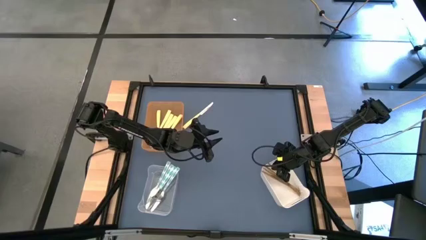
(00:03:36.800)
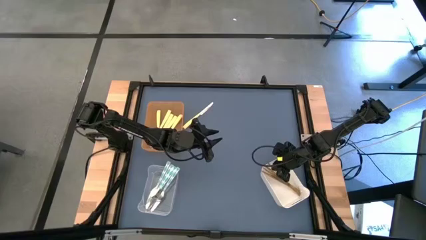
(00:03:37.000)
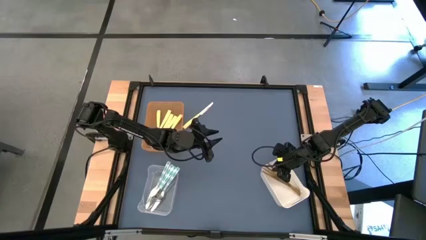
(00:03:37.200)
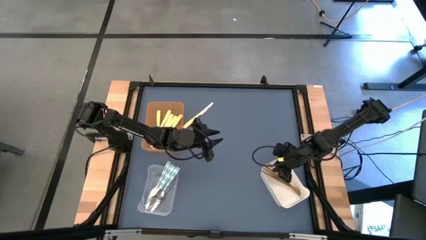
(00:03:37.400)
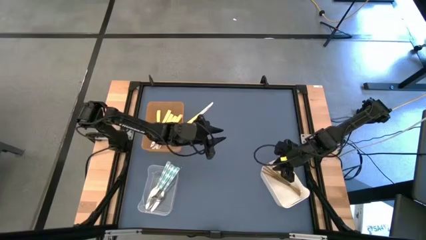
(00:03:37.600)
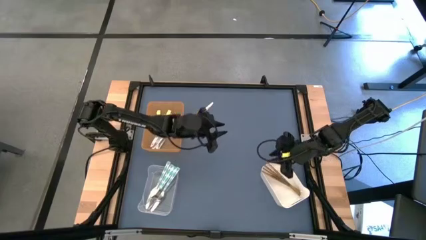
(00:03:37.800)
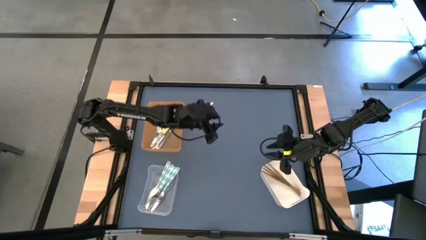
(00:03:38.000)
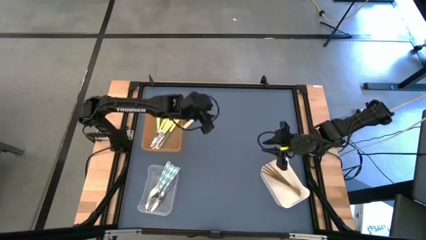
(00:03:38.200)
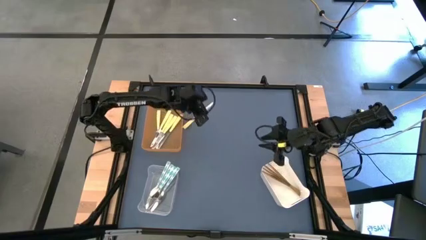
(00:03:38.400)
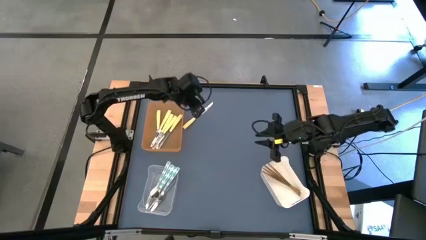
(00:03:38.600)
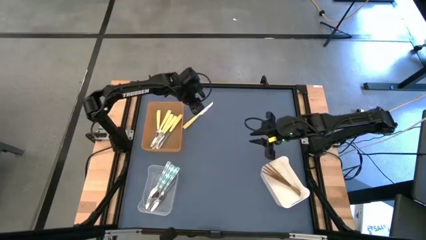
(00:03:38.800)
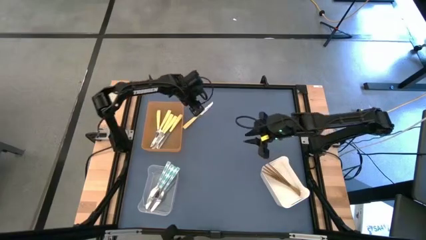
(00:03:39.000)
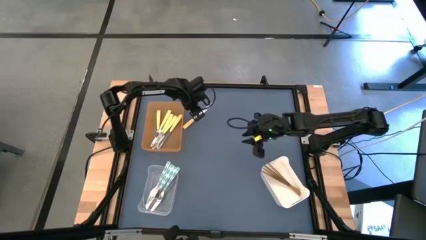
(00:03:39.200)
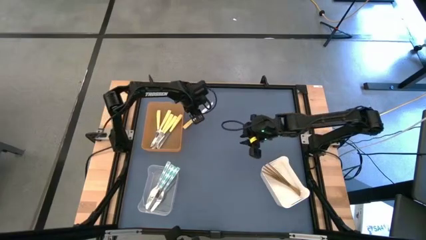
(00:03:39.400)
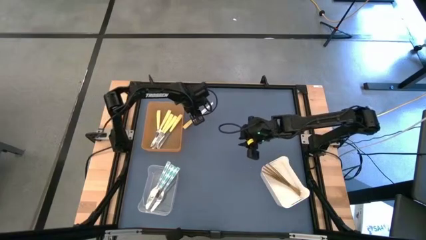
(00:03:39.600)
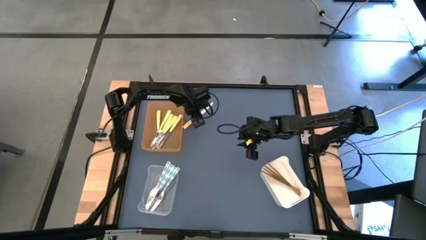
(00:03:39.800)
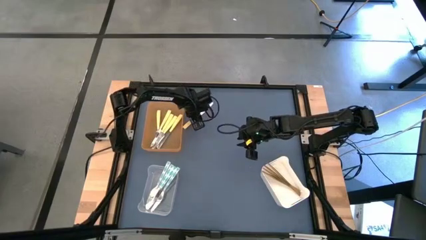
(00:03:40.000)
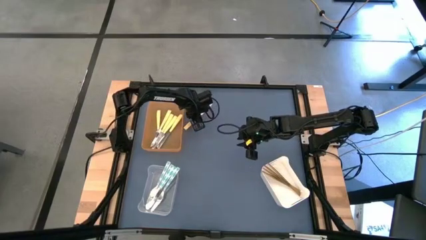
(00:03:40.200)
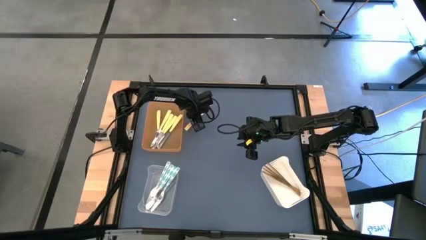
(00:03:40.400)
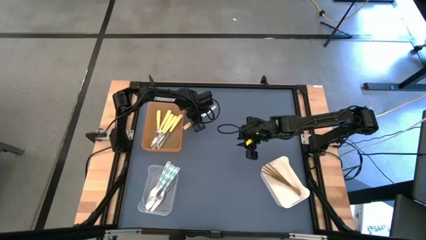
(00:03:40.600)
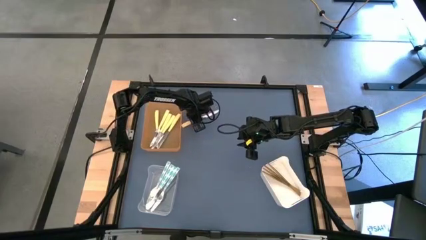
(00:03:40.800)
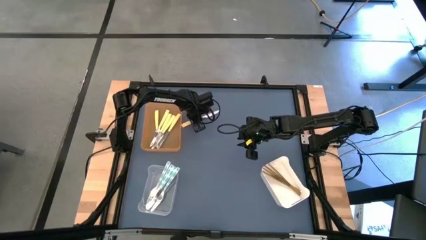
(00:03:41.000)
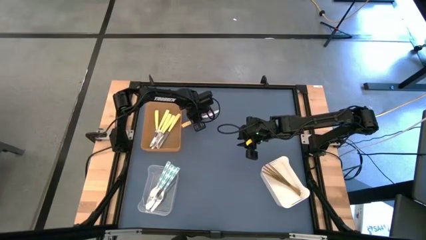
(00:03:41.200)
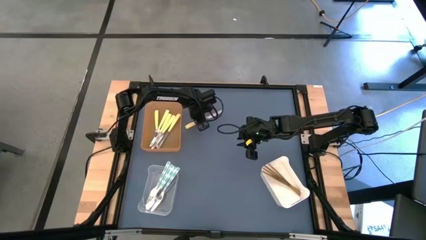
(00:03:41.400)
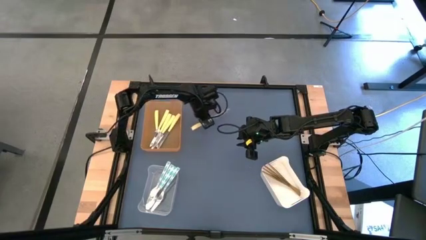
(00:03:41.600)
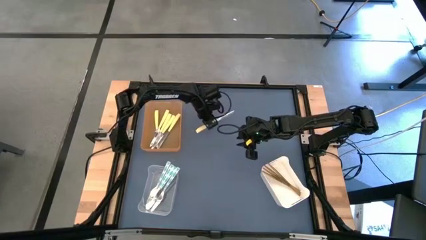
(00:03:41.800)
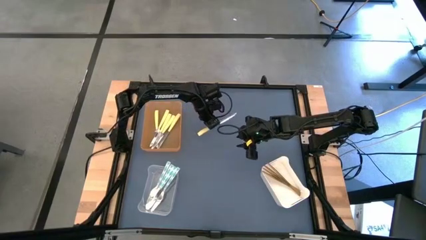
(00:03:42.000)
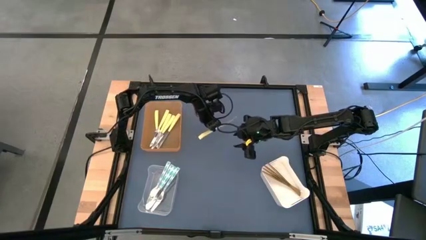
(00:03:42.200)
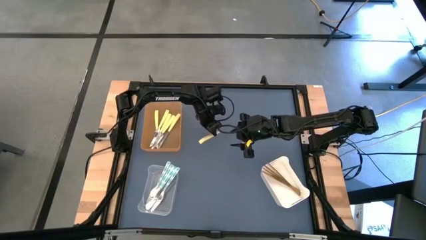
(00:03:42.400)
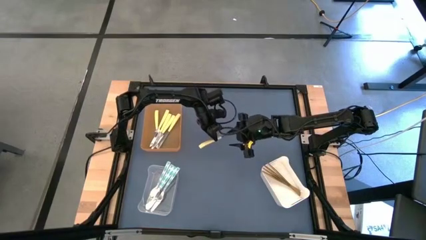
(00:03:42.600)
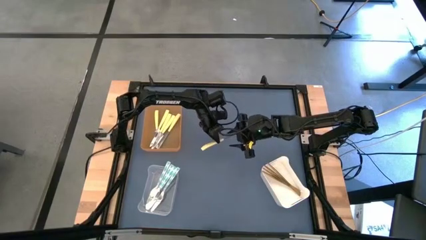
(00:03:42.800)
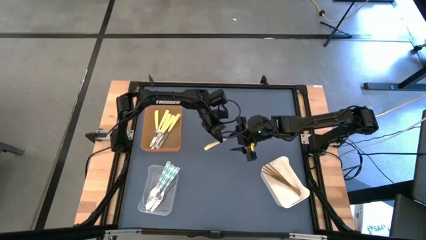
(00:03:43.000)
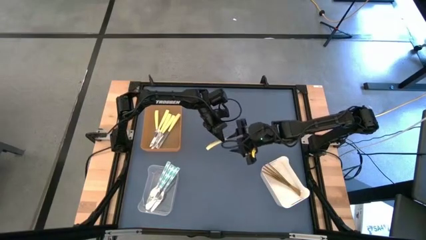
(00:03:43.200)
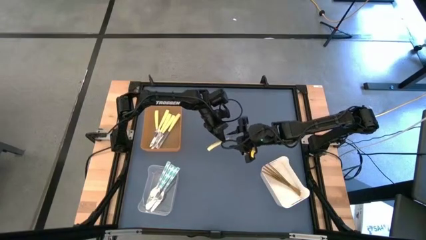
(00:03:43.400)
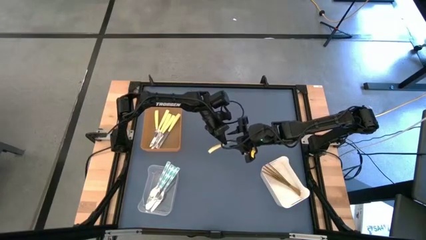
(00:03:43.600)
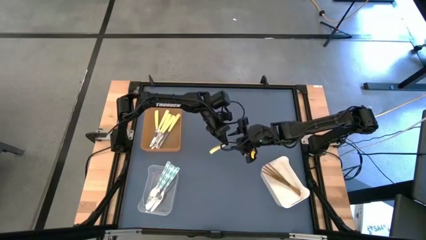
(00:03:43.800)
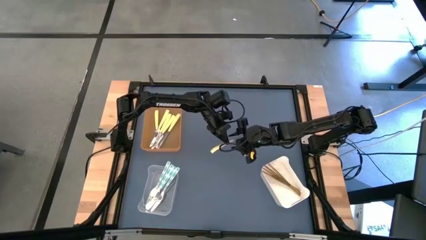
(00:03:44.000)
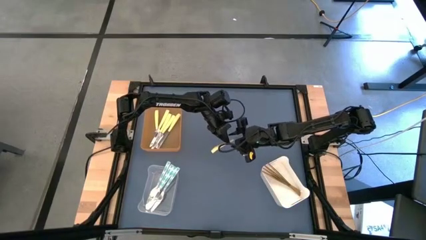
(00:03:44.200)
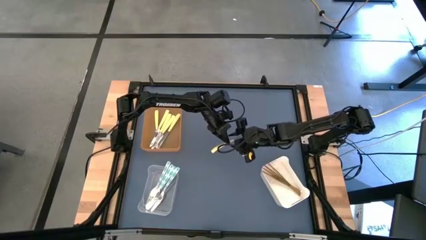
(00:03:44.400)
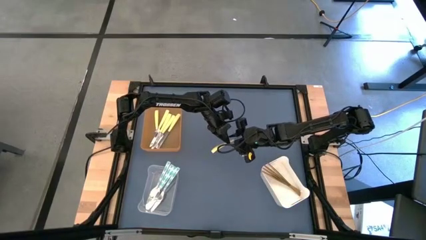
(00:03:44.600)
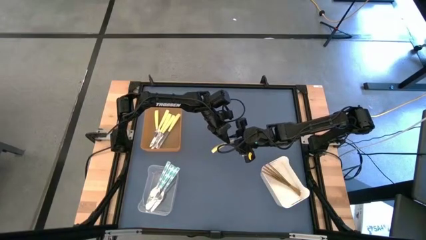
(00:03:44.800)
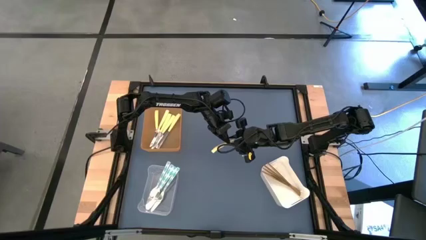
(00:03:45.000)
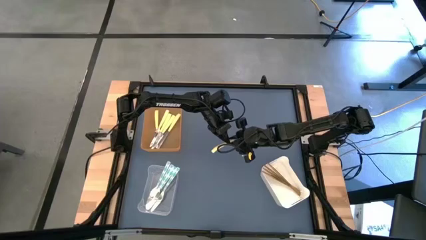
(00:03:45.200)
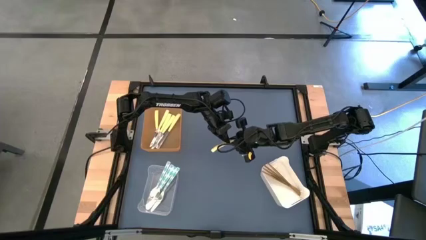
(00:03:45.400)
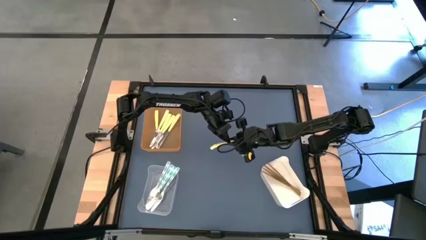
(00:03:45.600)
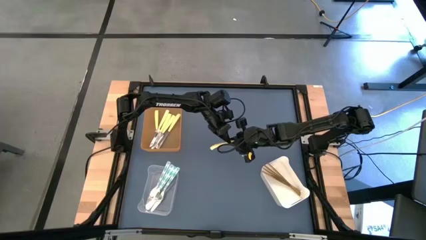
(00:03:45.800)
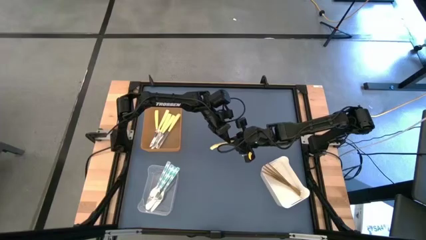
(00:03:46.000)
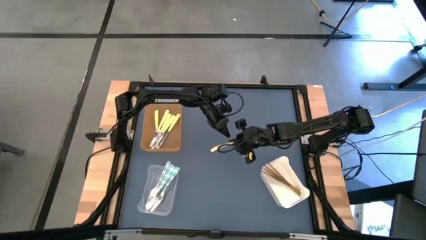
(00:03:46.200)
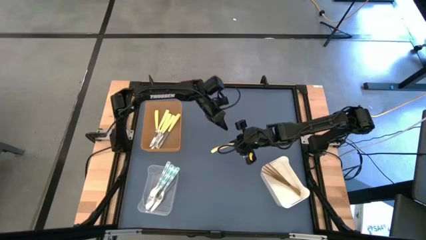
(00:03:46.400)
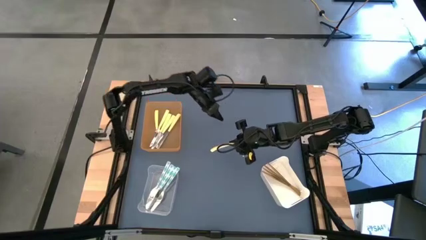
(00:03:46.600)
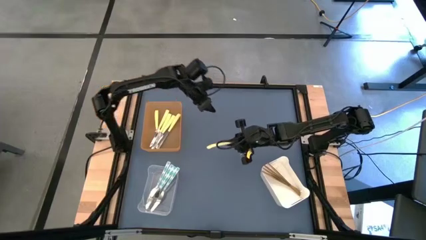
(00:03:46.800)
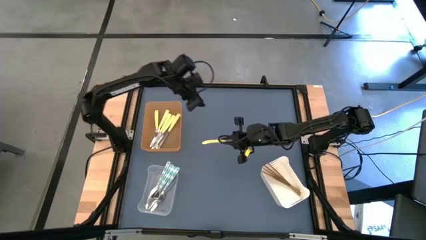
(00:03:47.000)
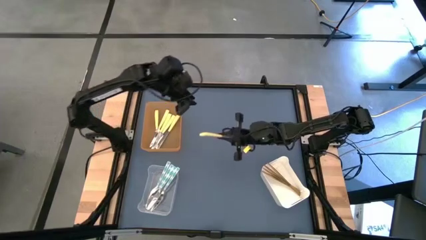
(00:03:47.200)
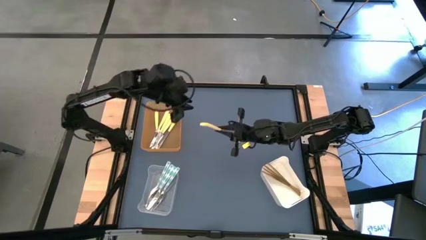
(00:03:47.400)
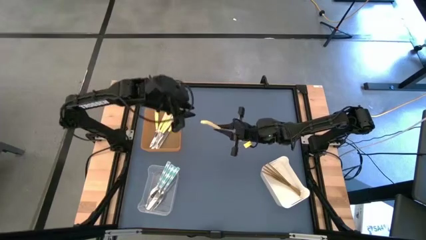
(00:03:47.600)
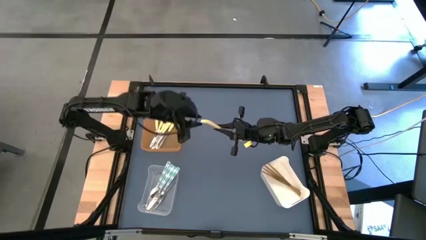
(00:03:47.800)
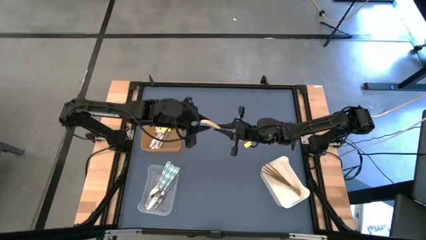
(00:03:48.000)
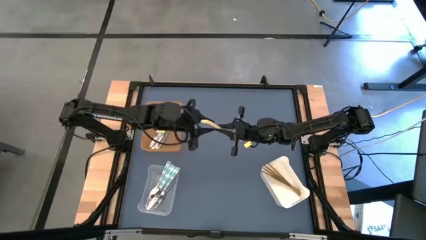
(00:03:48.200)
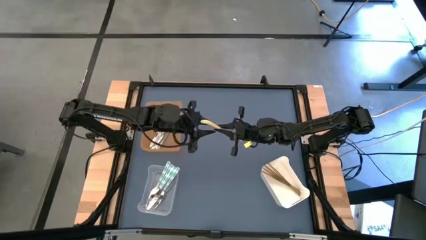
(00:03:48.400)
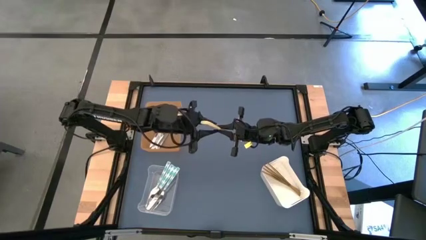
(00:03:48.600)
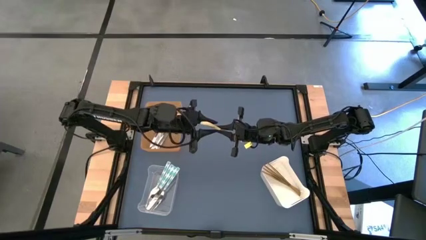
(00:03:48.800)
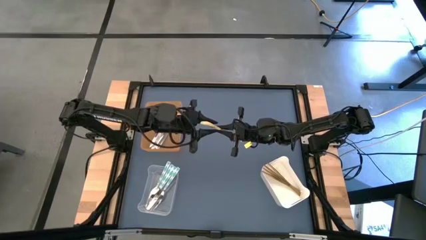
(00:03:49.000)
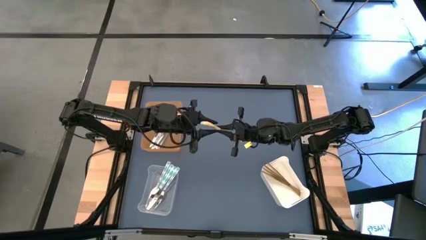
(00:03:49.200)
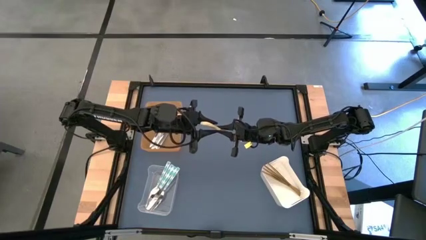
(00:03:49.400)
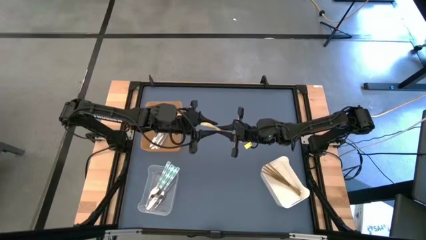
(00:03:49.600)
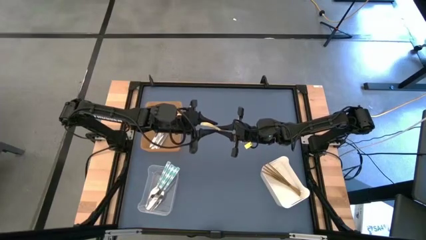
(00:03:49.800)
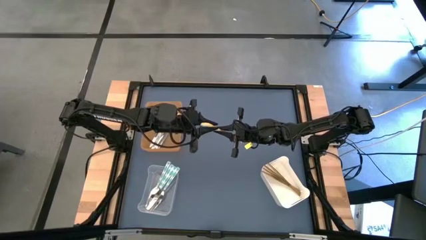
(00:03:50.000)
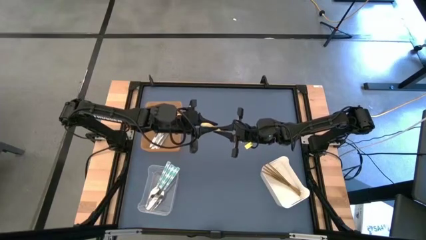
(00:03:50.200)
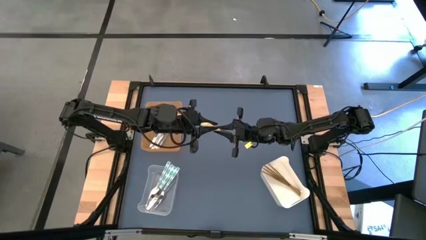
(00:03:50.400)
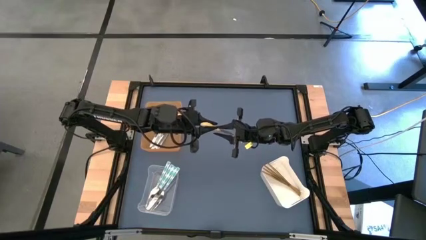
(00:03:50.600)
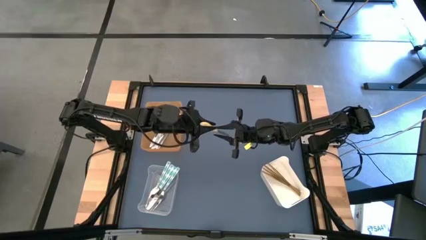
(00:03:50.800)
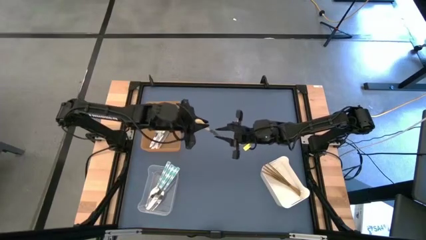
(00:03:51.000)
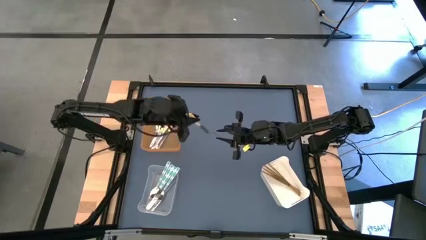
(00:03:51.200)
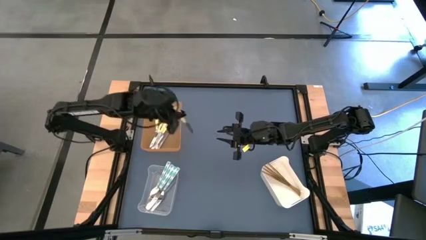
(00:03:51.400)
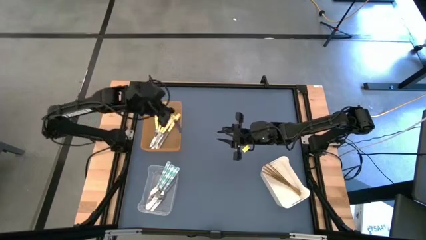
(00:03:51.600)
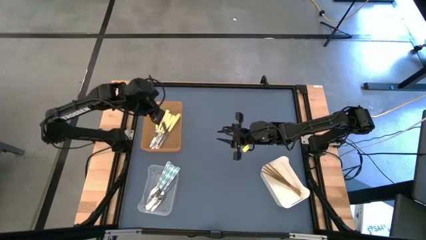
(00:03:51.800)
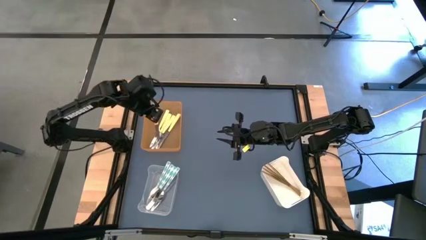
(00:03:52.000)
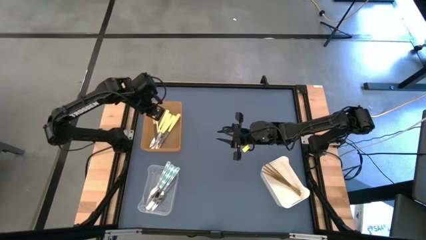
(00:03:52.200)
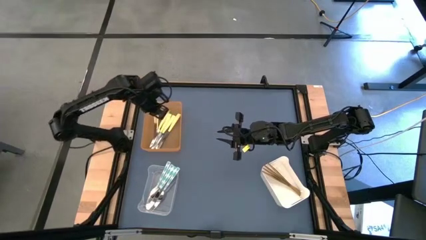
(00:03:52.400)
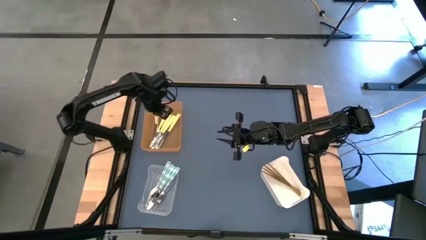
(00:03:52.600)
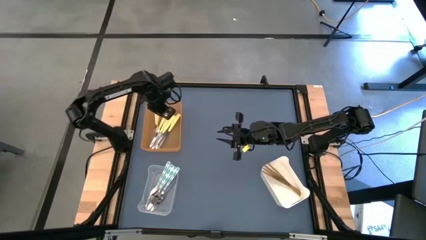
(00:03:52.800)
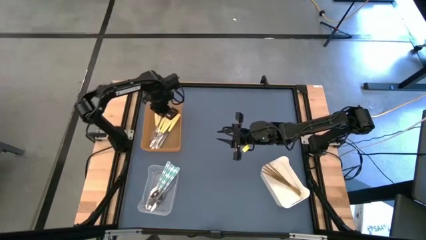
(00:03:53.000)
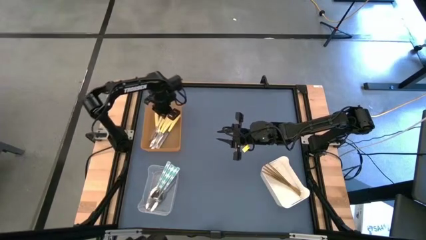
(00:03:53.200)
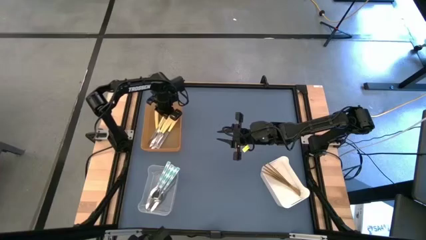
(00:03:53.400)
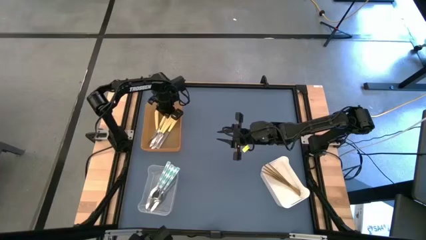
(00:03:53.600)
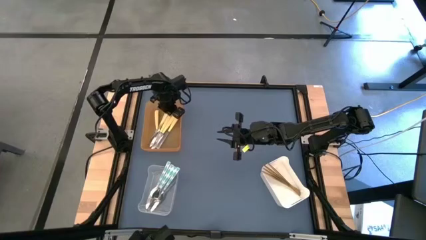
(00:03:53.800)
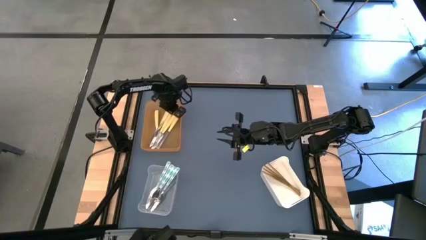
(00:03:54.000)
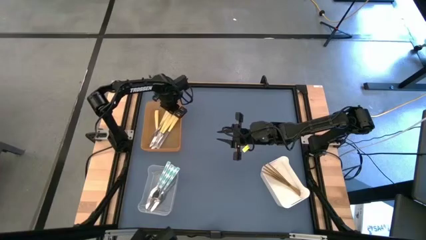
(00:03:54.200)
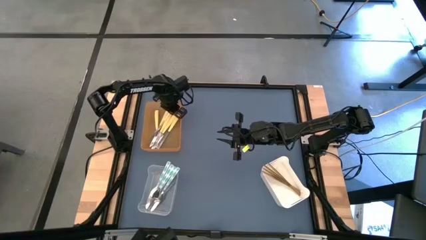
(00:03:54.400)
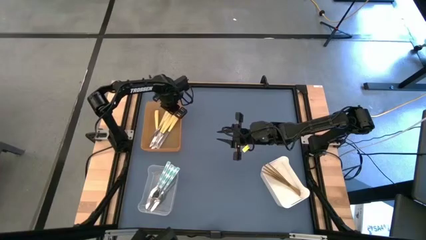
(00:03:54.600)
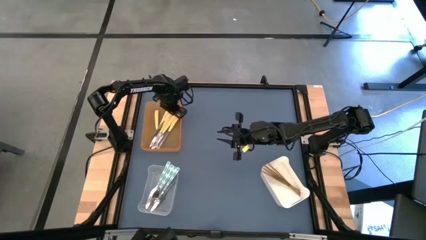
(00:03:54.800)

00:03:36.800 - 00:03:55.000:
Task: Sort silverware by color (type)
Put the yellow knife into the orange bin
